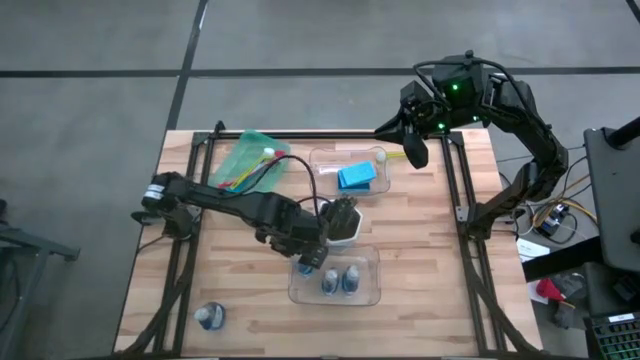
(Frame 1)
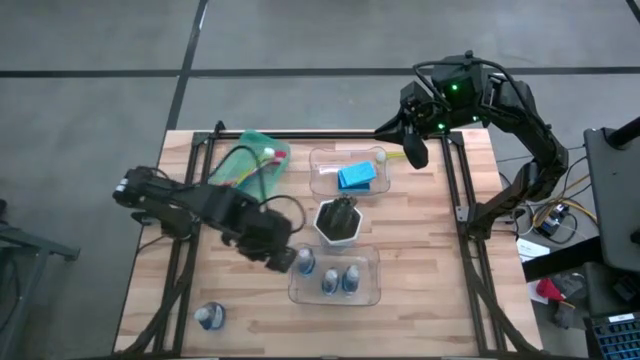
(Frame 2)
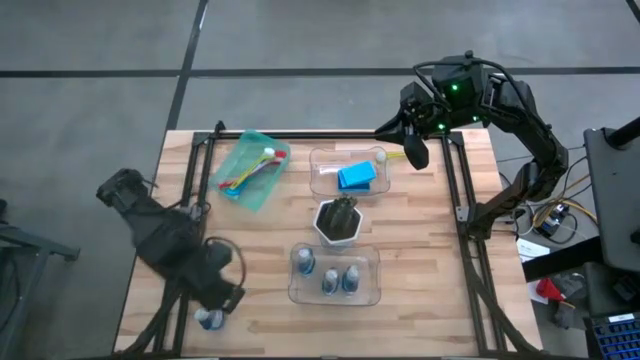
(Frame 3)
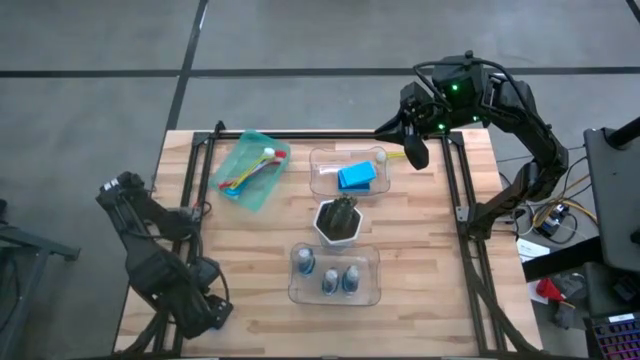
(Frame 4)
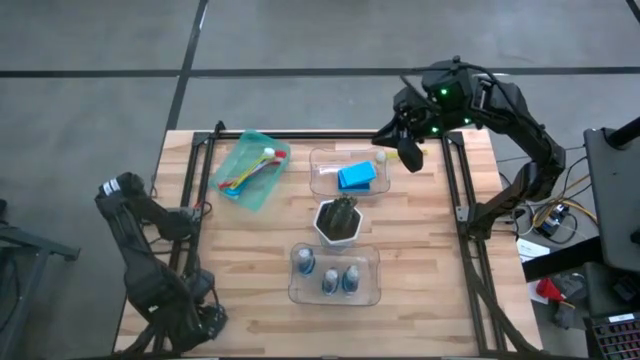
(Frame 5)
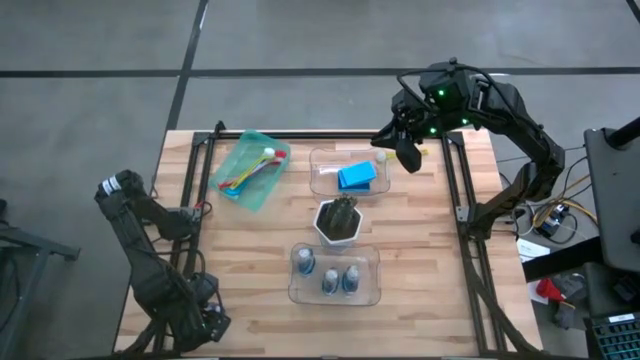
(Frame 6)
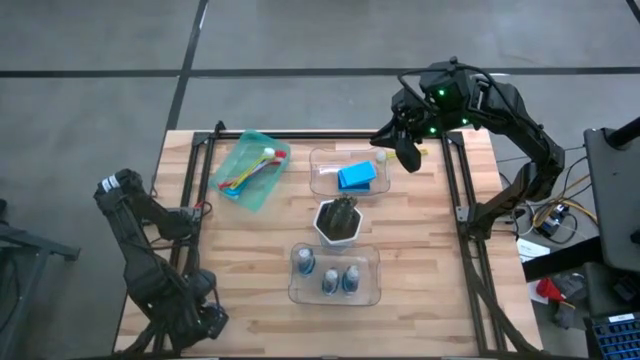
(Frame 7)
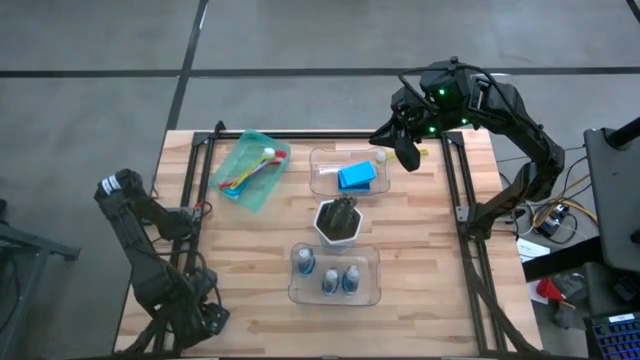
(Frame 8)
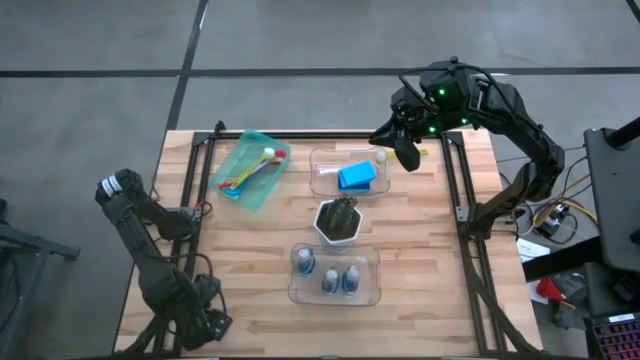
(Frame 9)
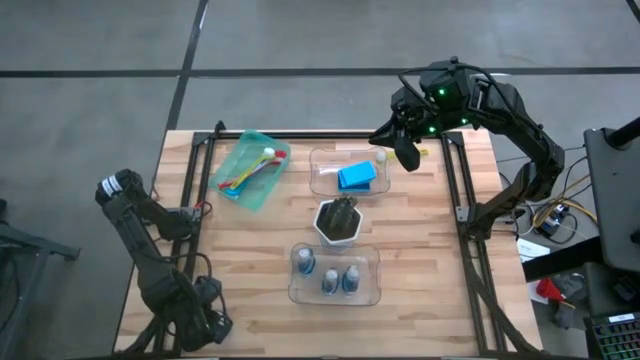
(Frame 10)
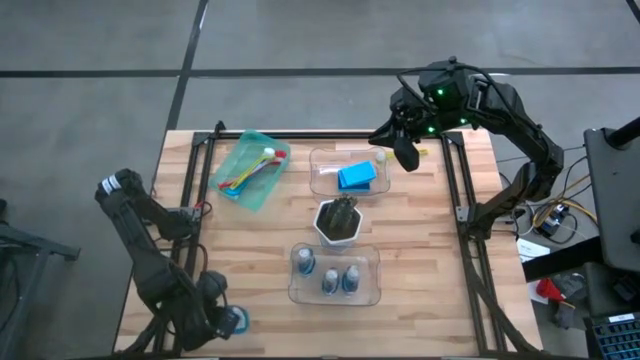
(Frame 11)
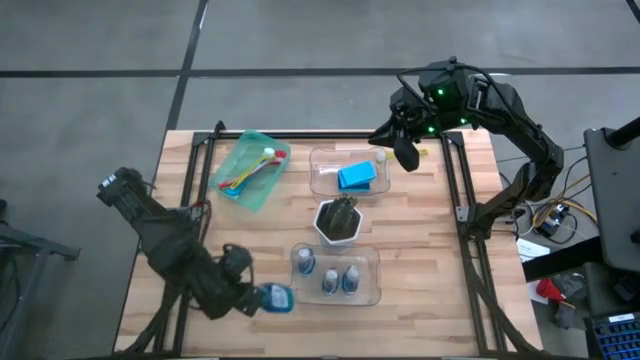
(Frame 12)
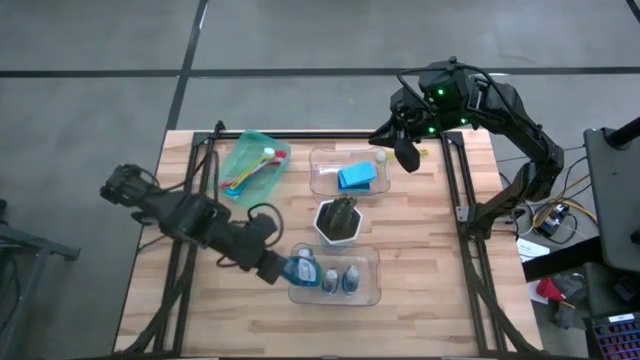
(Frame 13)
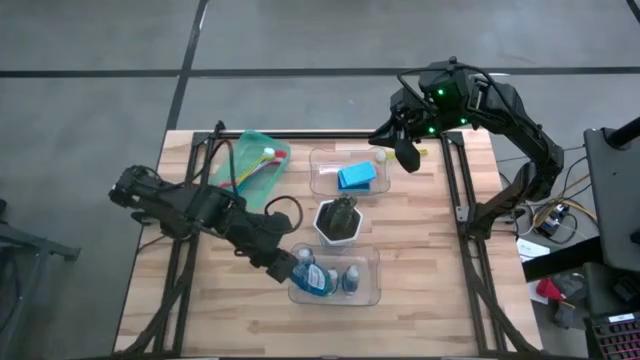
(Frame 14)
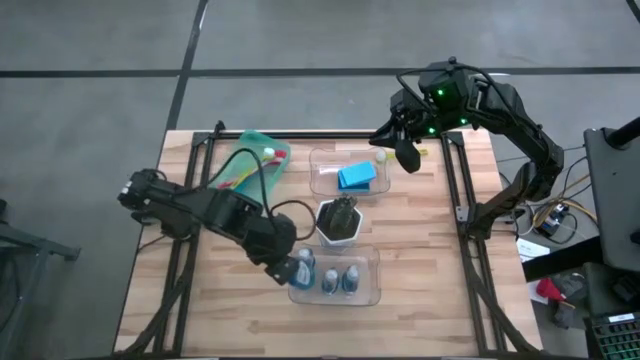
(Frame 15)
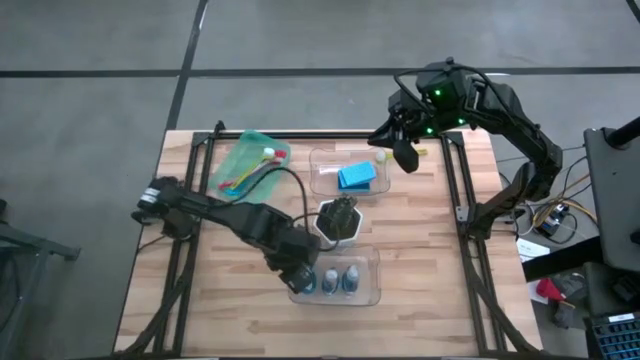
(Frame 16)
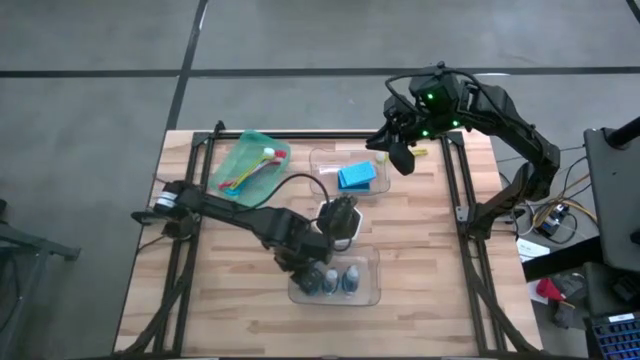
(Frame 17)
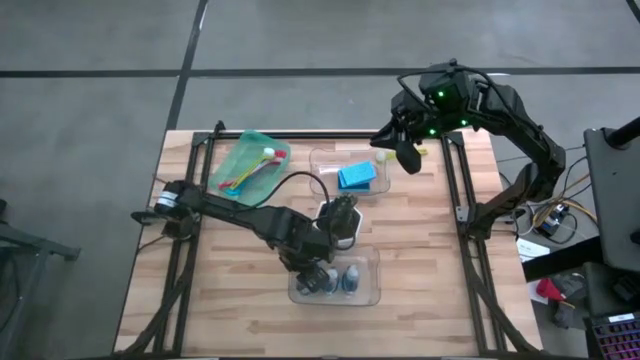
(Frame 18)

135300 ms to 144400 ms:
Task: Pick & Place Kitchen Sink Supplies
Put the blue dishwashing liquid bottle into the bottom transparent bin

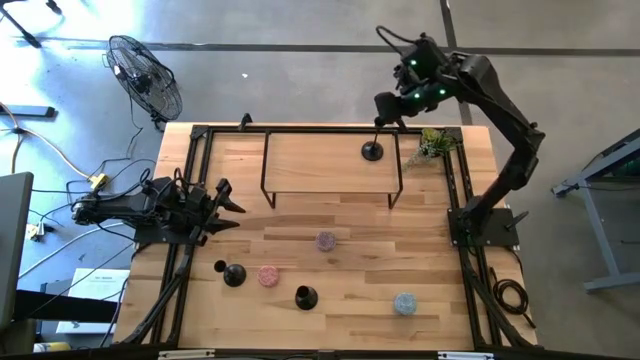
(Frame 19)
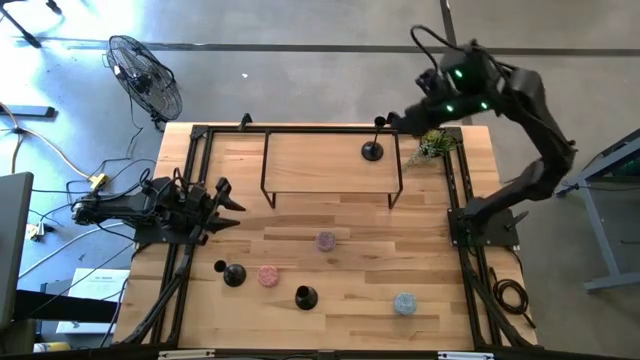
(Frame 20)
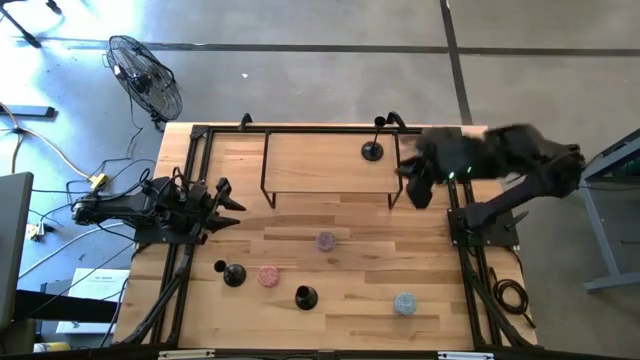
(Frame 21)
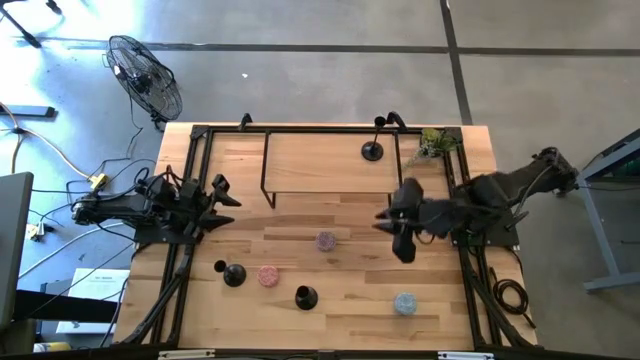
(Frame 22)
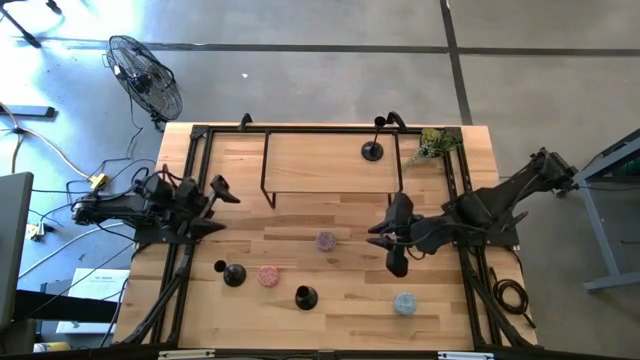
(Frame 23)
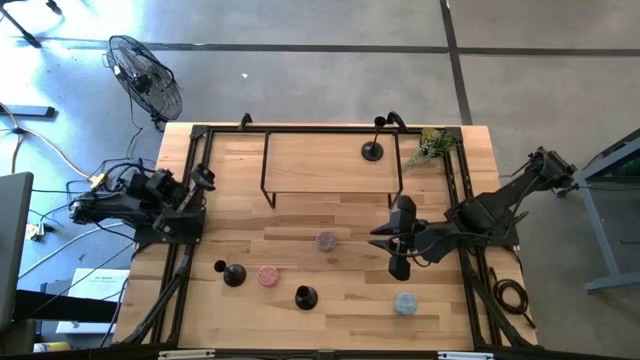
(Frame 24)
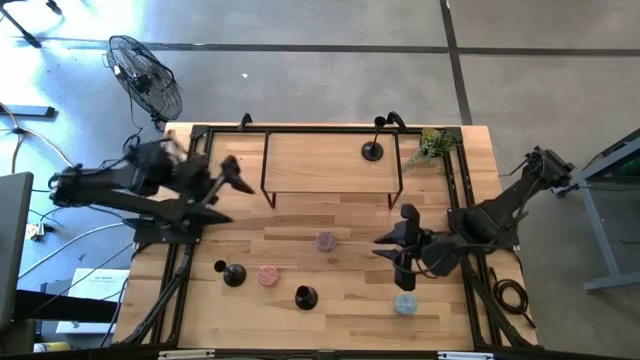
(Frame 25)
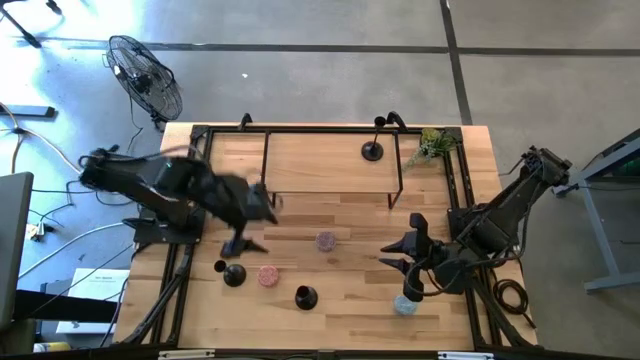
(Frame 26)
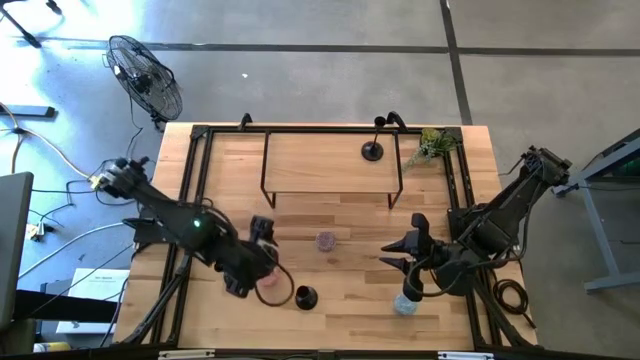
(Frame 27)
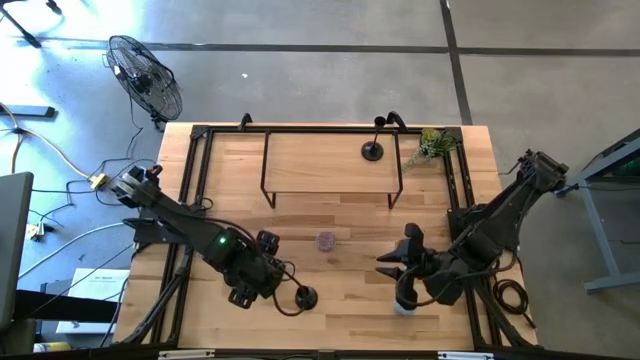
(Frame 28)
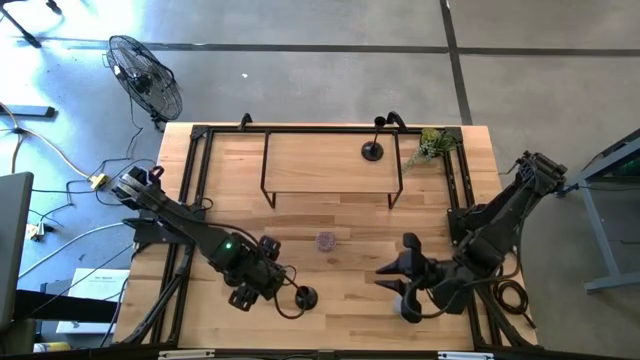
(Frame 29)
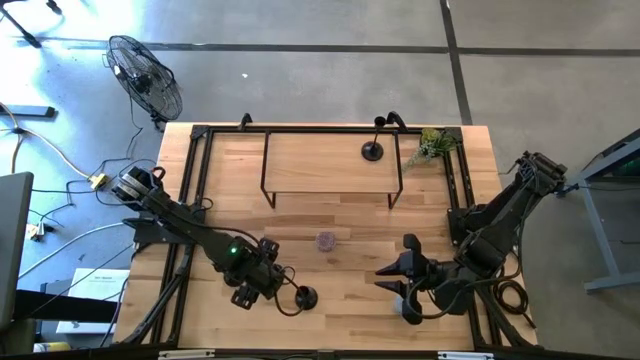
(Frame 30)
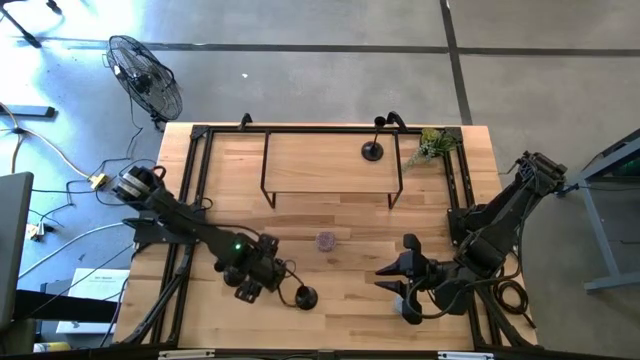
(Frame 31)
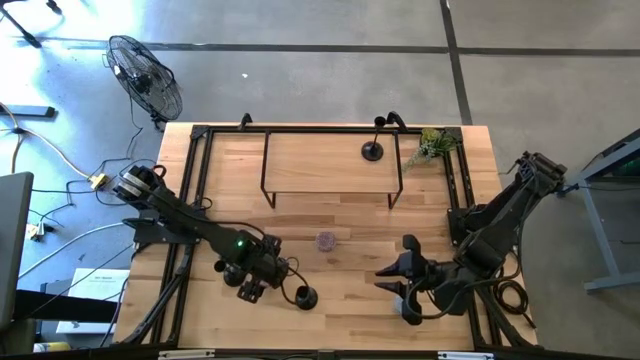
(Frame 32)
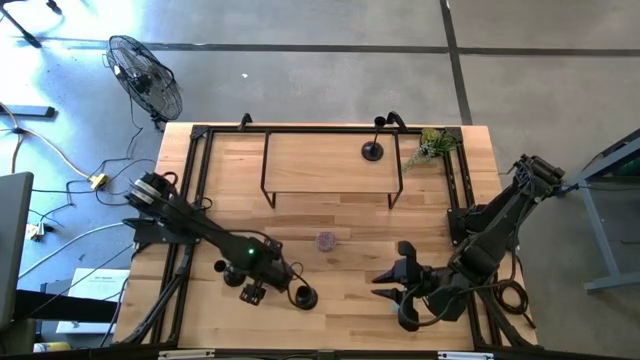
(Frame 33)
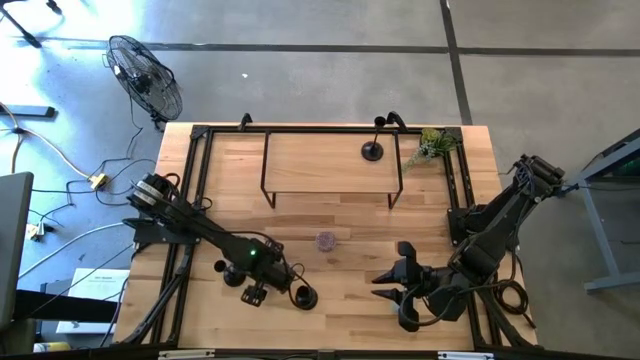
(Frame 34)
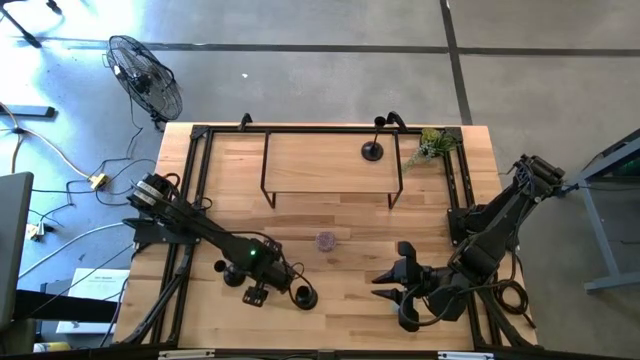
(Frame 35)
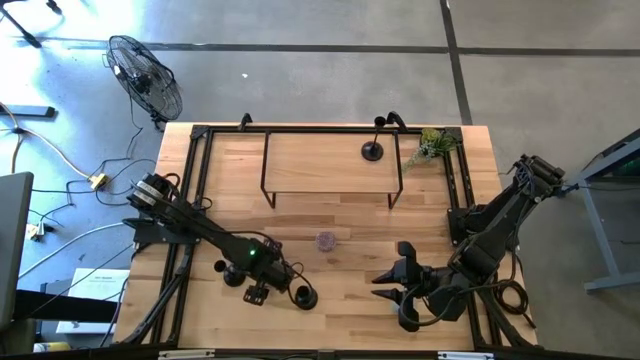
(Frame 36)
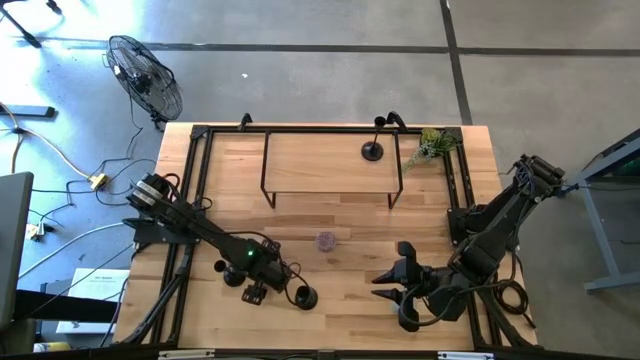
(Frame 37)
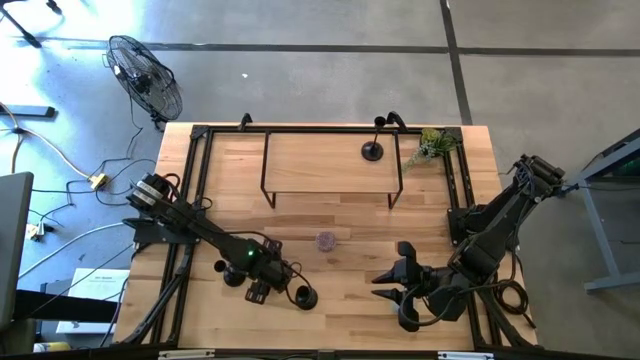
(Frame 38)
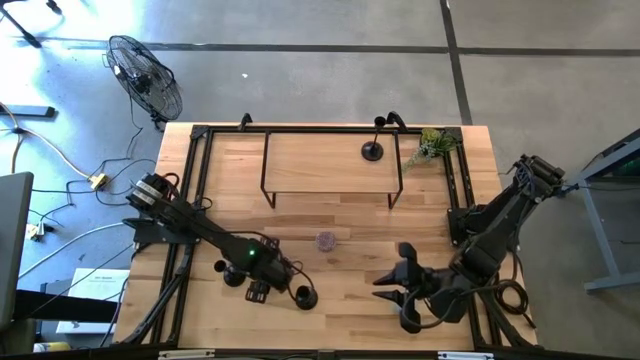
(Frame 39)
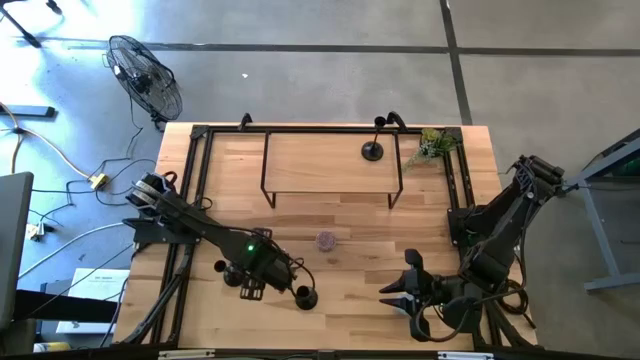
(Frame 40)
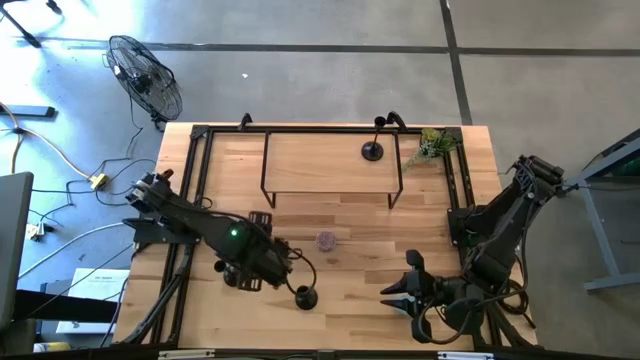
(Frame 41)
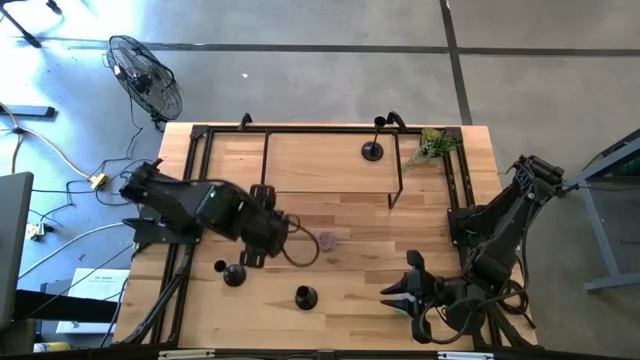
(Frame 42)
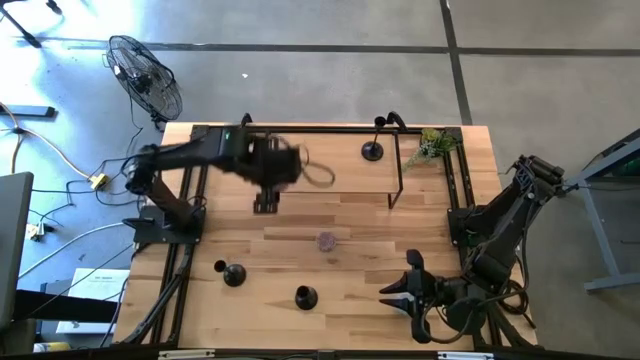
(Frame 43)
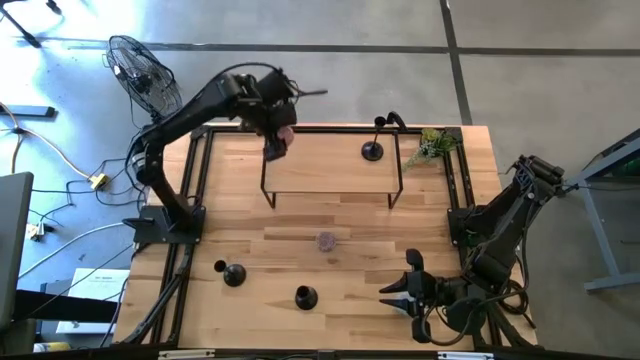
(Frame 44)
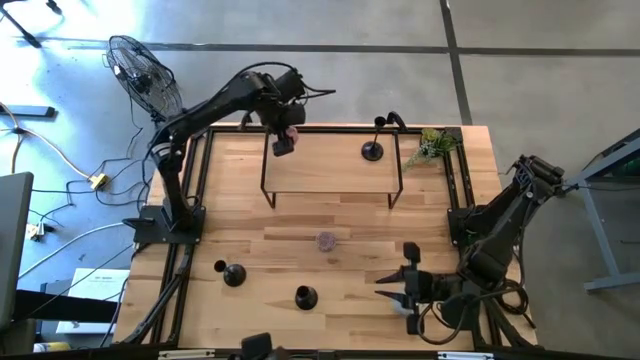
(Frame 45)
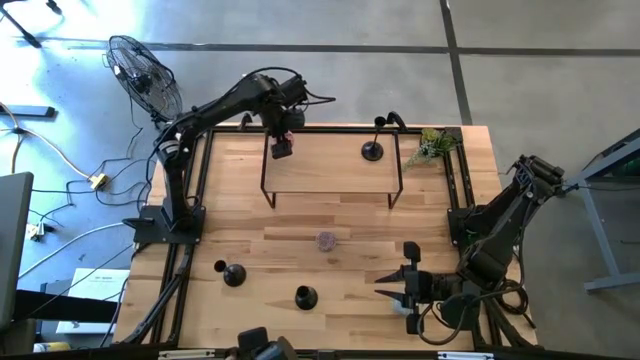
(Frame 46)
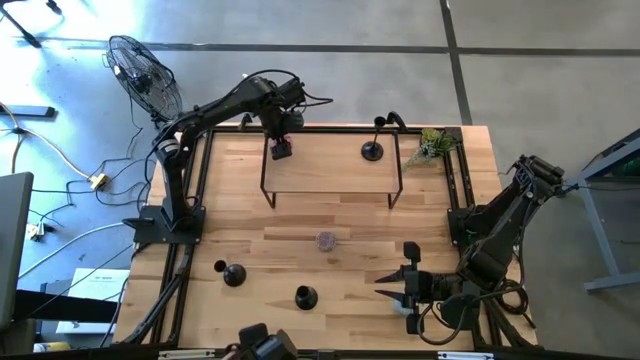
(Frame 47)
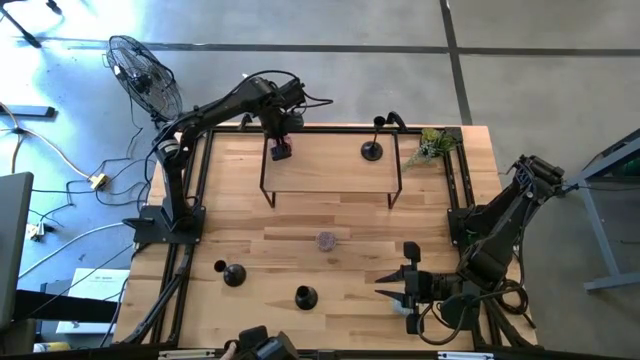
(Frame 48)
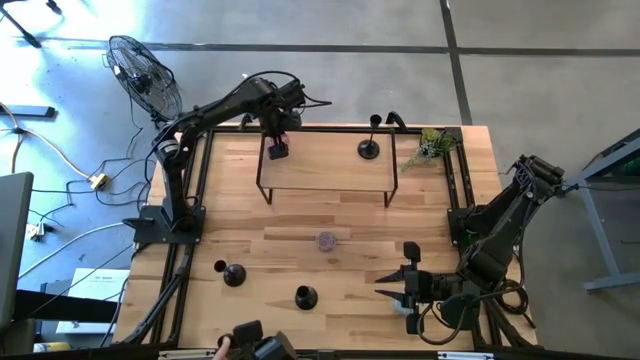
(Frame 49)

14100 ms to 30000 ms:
Task: Pick & Place candle stick holders
Put the pink patterned scented candle on the shelf
